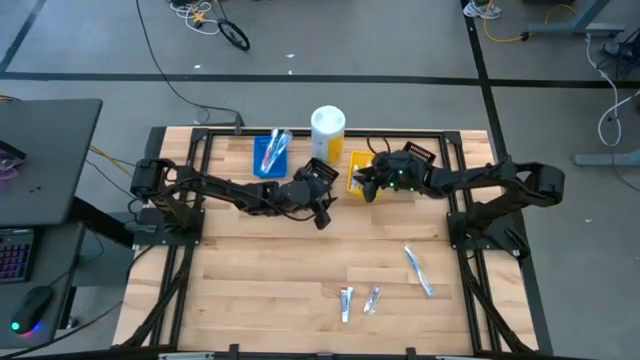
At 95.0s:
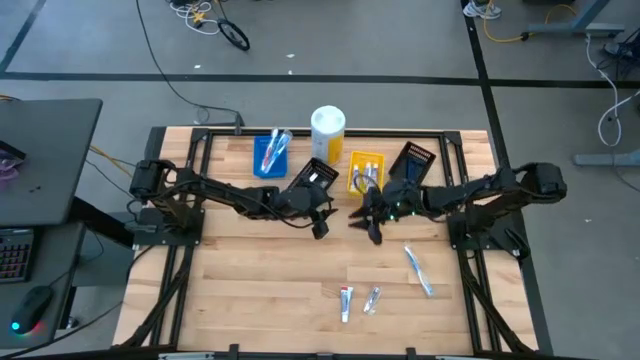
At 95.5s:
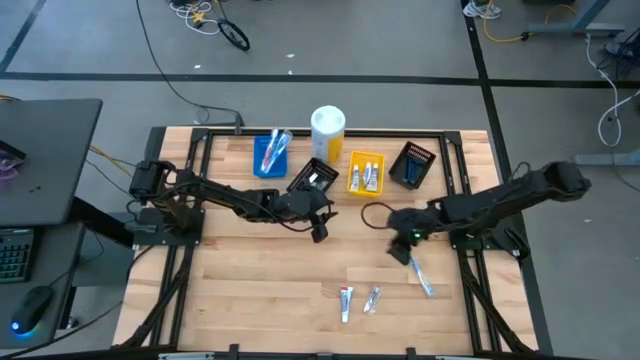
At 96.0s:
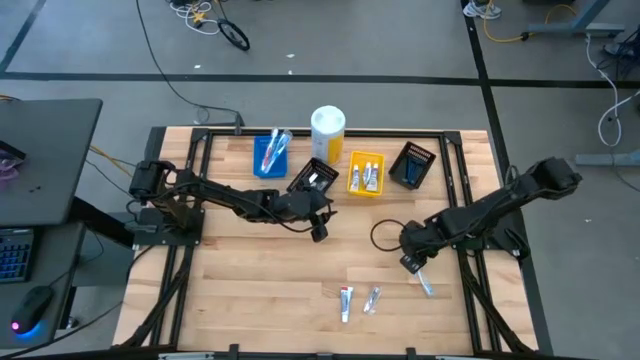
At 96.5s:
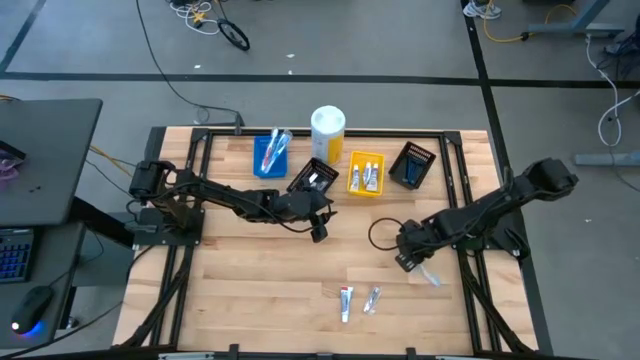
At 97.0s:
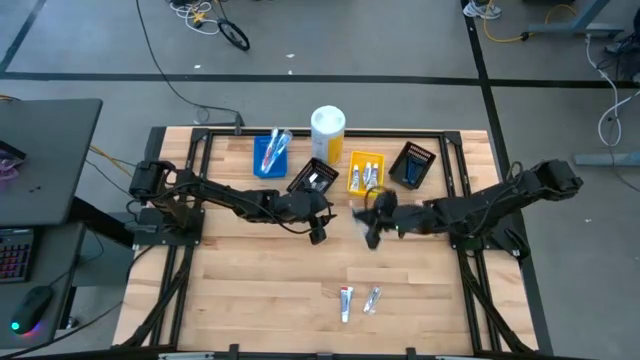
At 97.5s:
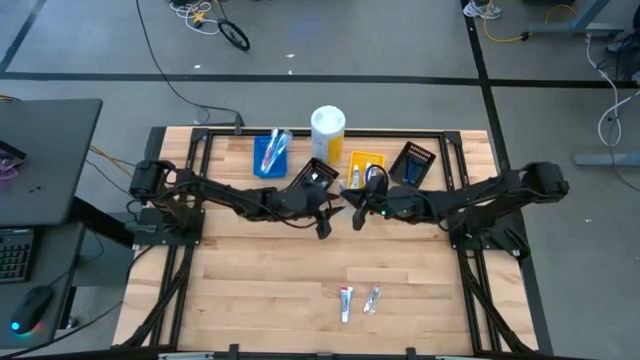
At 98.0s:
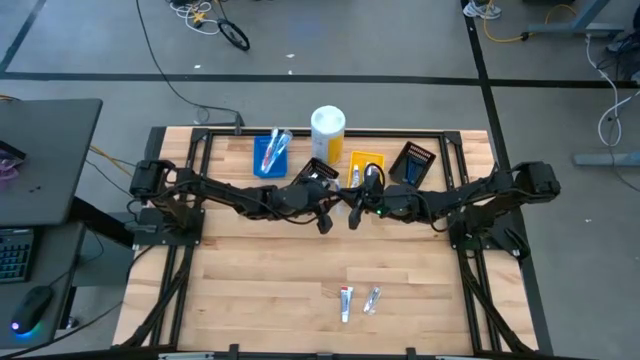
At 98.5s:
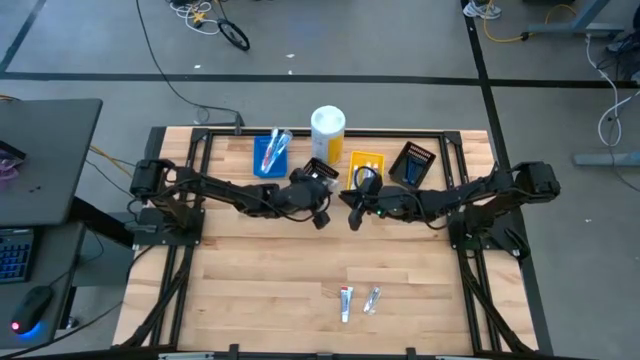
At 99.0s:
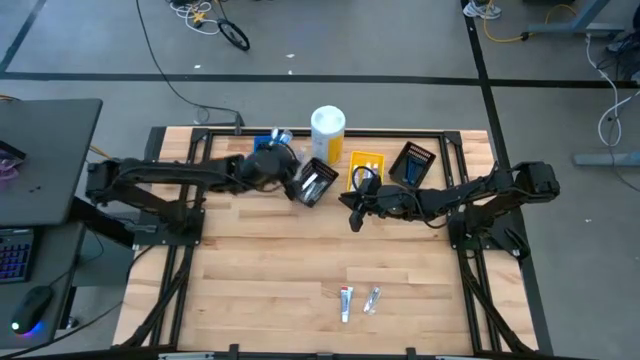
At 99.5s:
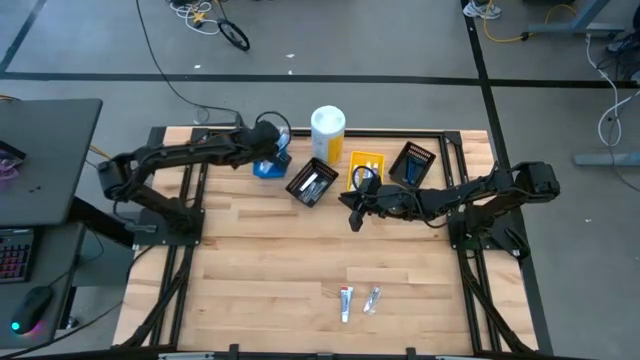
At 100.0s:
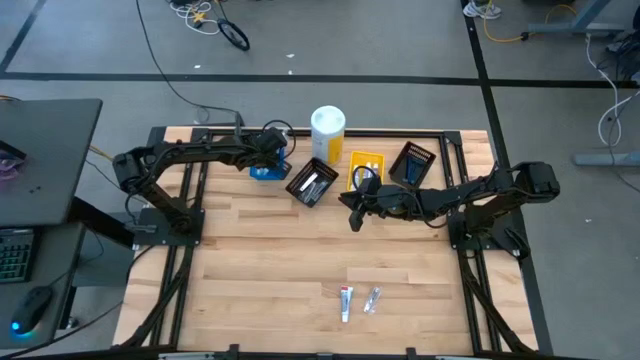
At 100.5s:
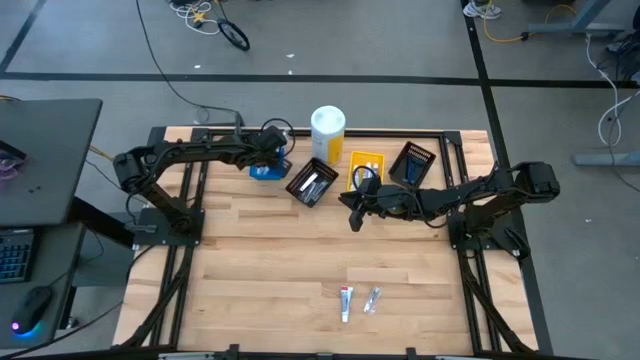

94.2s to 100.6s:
Task: Pick & Place Travel size toiletries
Put the blue toothbrush into the blue bin

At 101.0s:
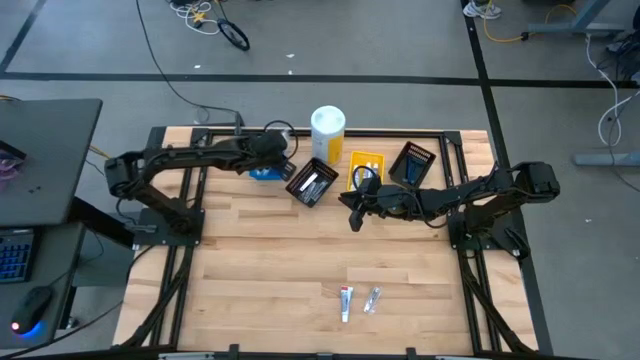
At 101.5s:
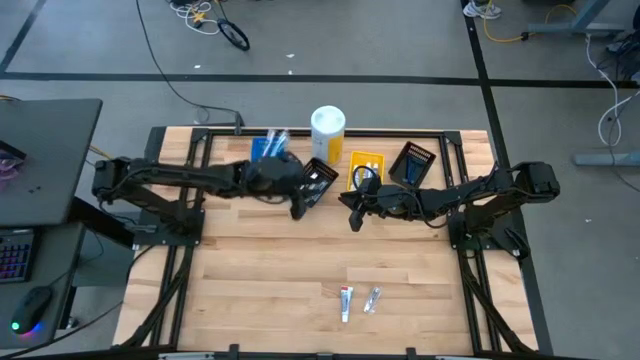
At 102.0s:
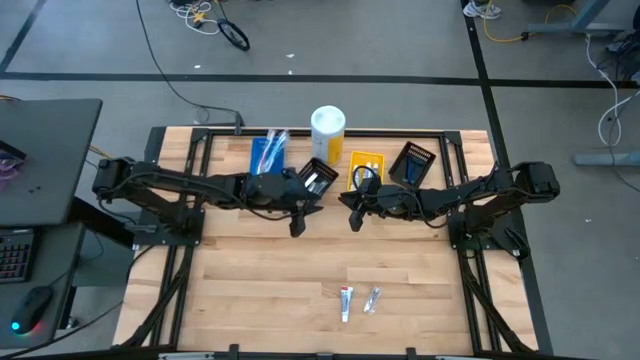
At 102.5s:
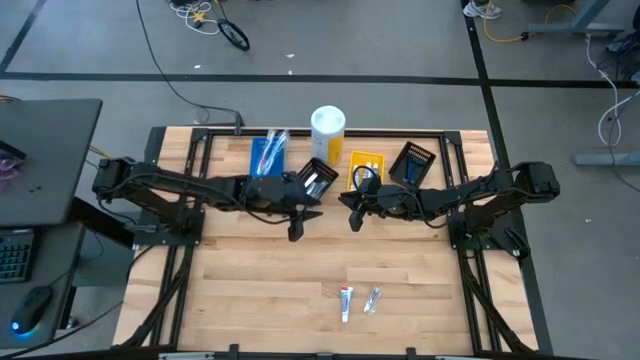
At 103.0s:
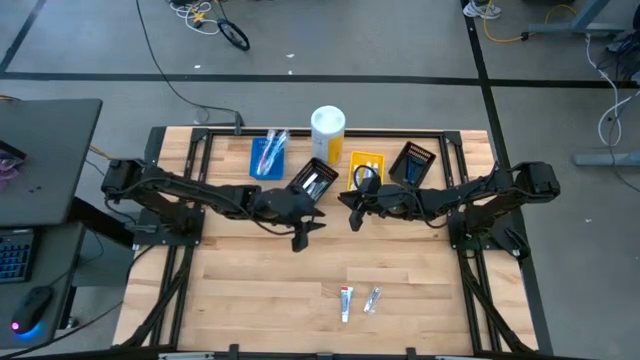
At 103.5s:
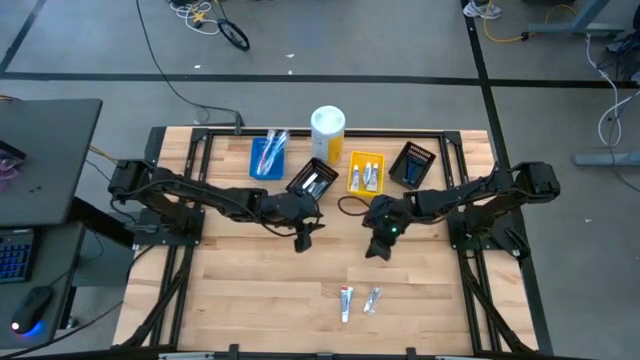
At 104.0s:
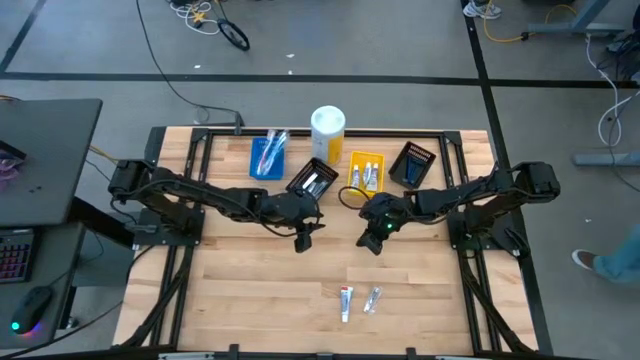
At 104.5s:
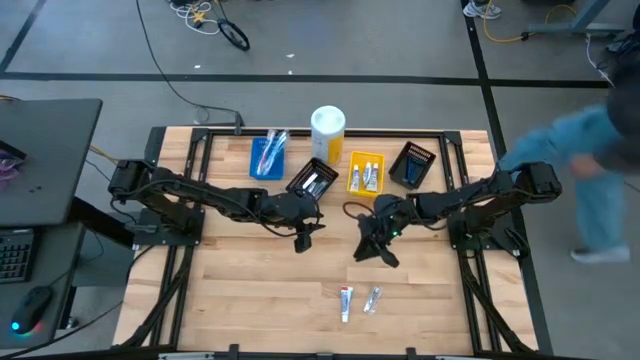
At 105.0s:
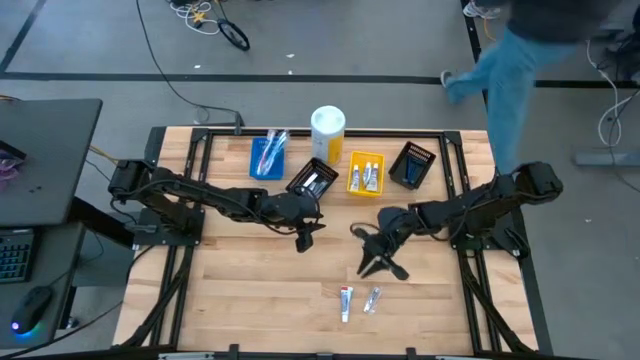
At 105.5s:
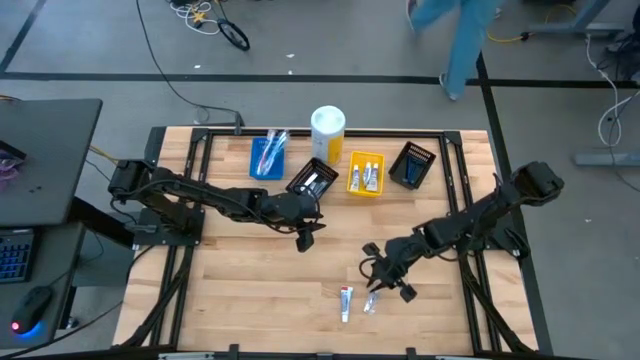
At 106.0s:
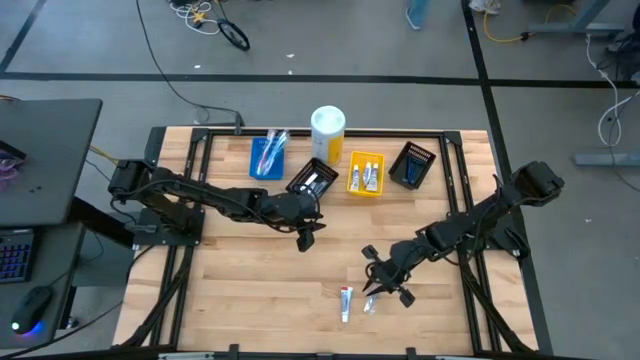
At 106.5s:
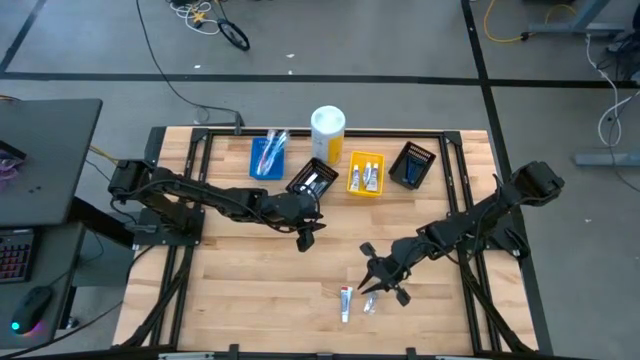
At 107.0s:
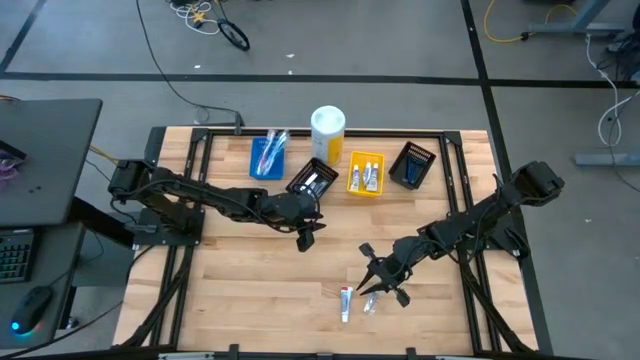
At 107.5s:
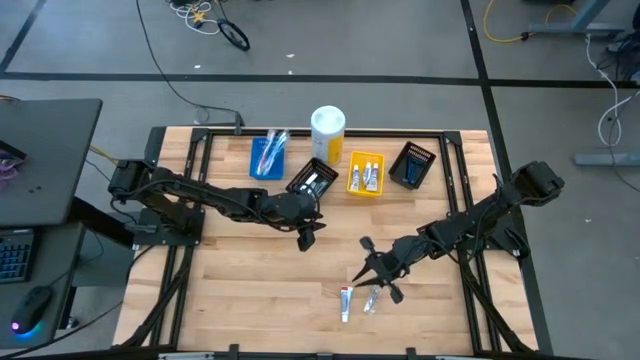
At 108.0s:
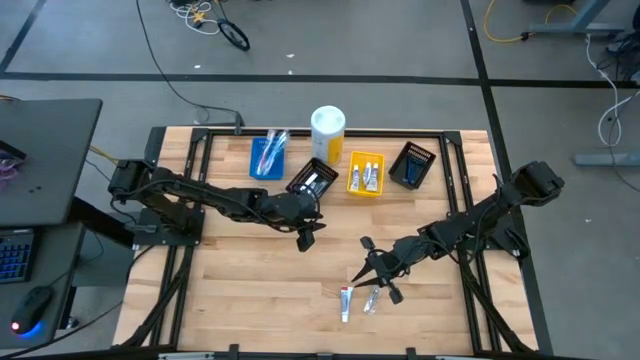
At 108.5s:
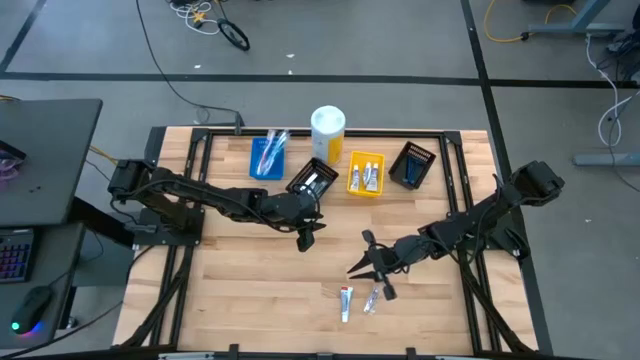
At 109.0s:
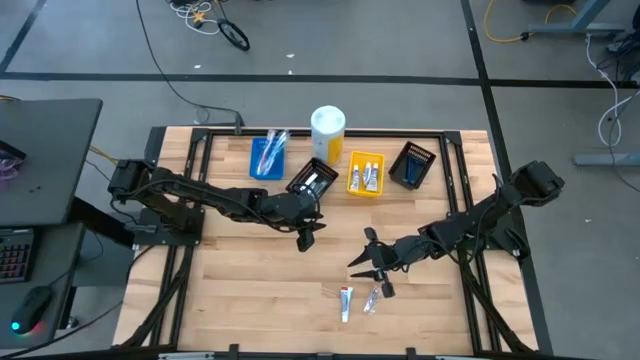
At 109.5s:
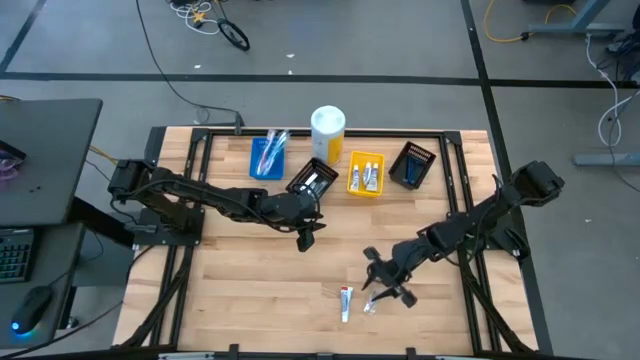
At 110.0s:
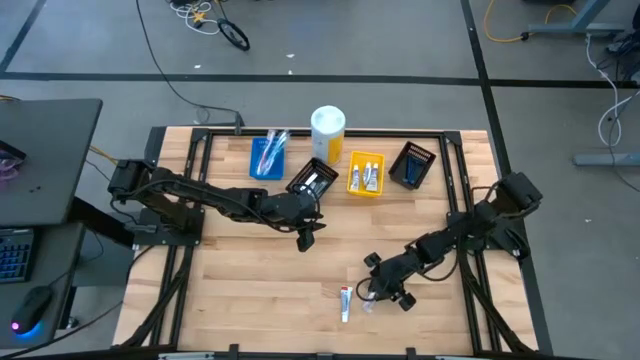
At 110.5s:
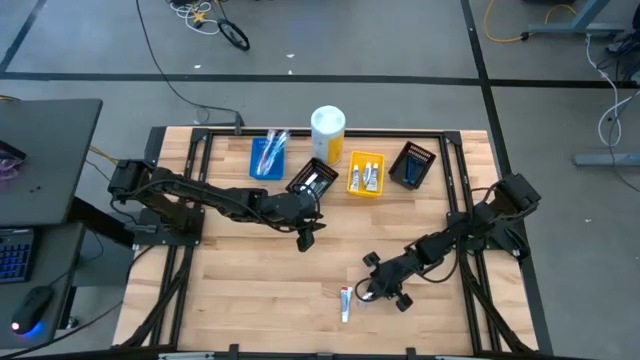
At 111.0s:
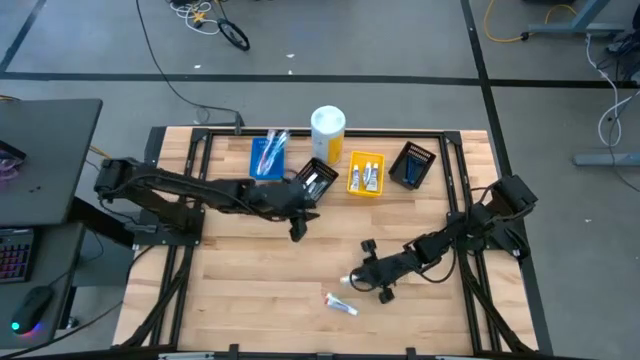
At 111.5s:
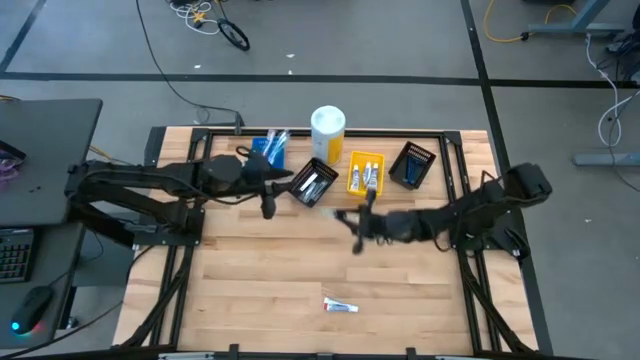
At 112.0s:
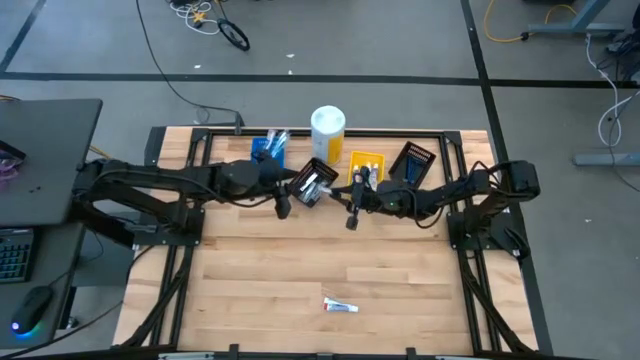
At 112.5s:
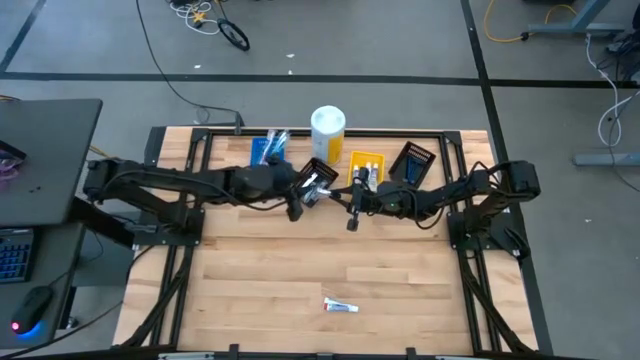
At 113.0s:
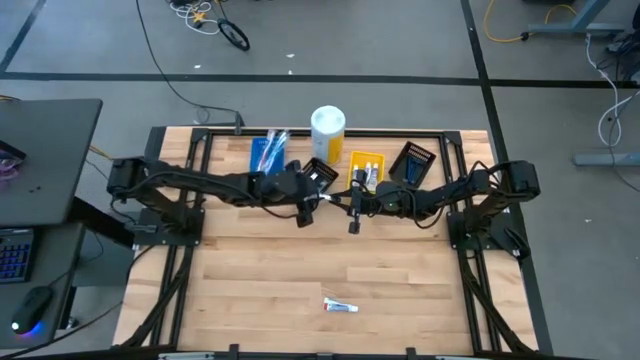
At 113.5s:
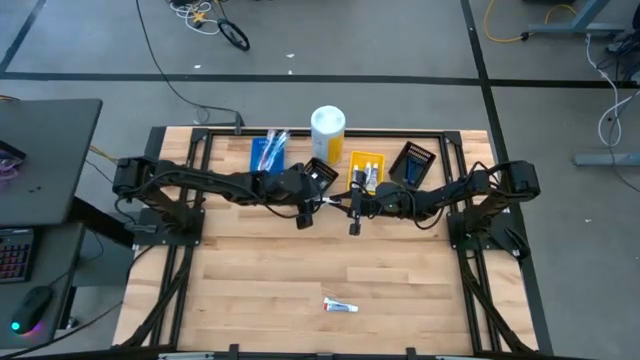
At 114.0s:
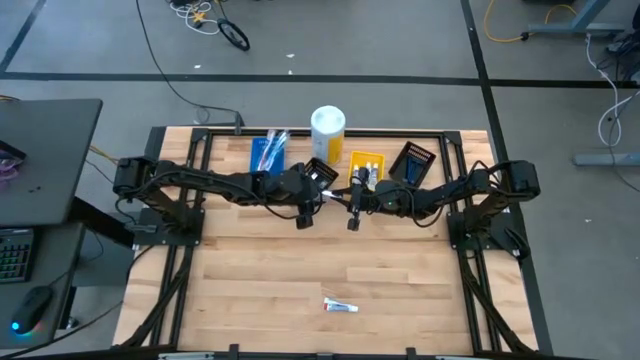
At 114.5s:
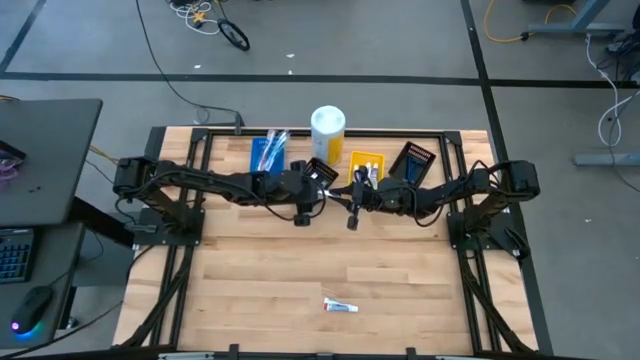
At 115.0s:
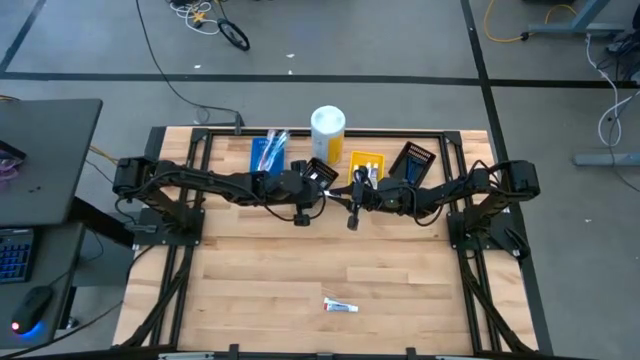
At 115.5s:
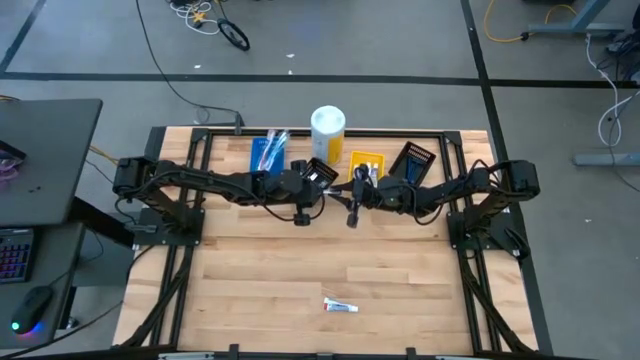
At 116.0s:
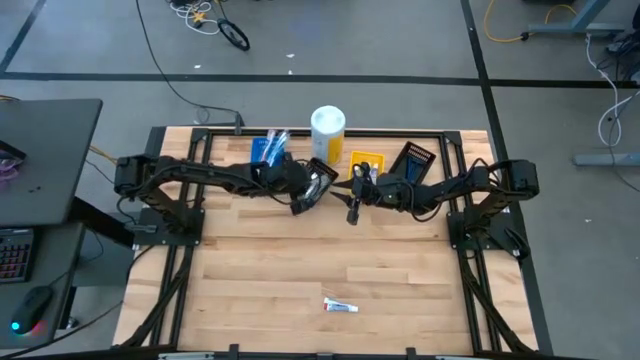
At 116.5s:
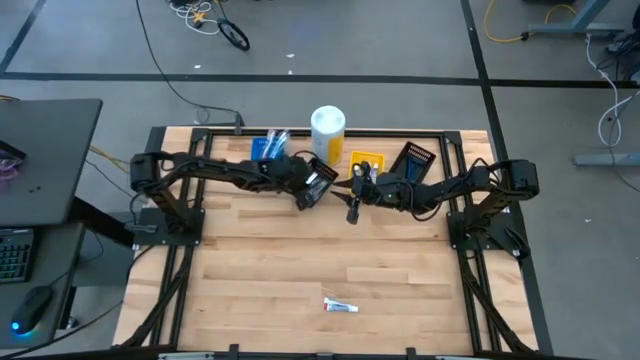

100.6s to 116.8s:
Put the silver nail cutter into the left black bin
